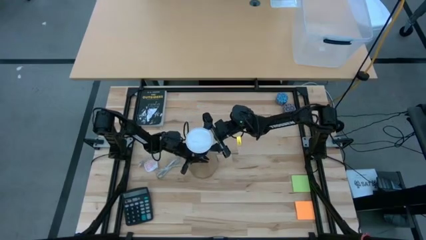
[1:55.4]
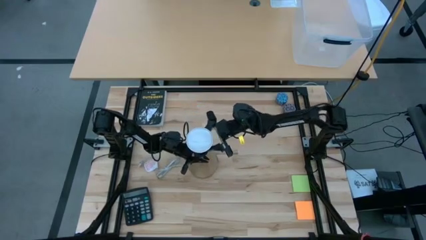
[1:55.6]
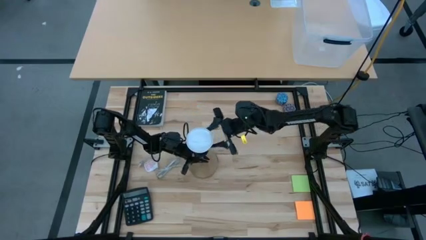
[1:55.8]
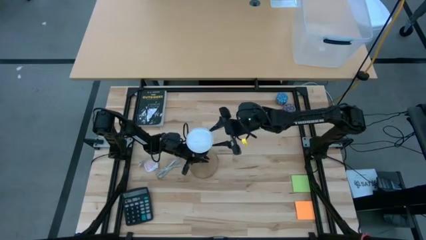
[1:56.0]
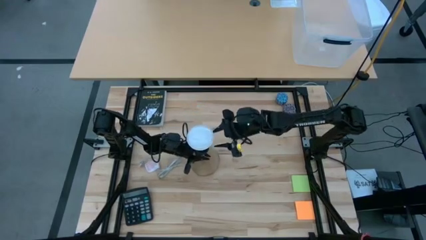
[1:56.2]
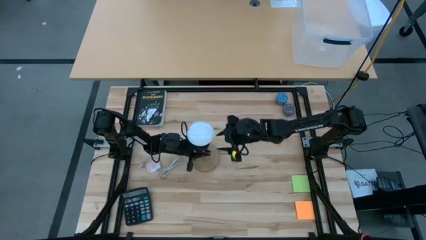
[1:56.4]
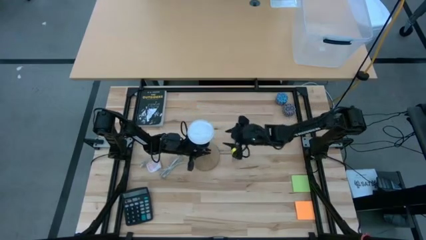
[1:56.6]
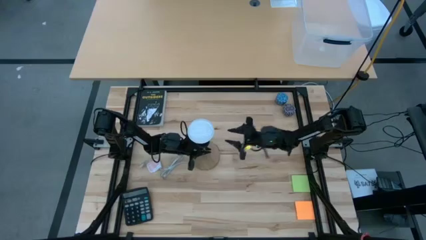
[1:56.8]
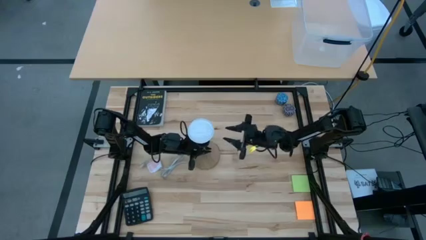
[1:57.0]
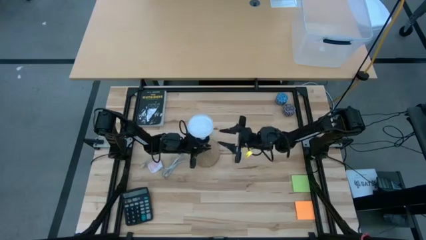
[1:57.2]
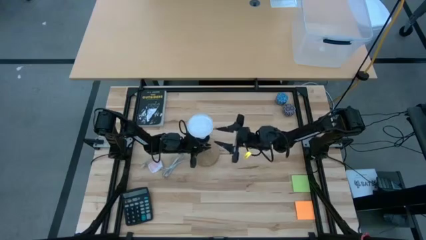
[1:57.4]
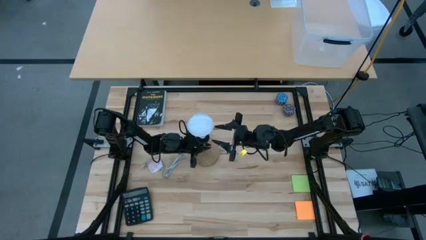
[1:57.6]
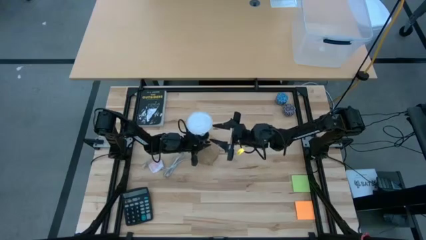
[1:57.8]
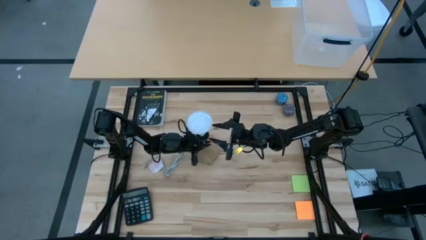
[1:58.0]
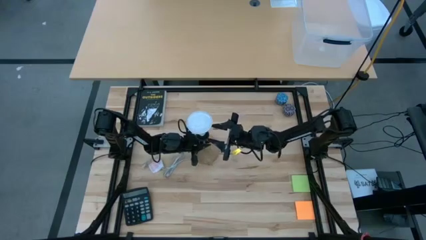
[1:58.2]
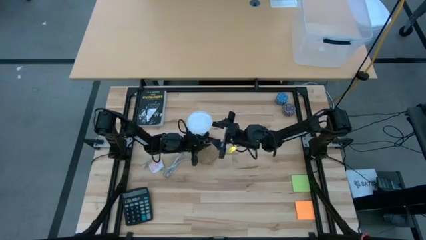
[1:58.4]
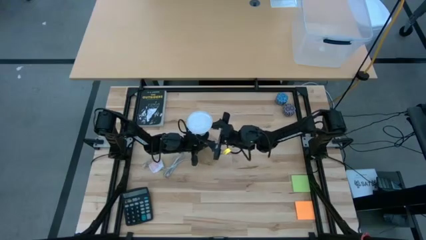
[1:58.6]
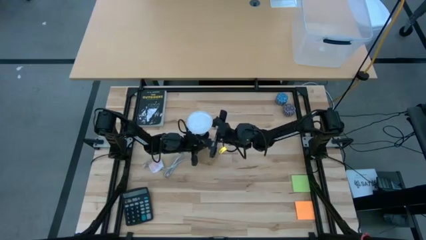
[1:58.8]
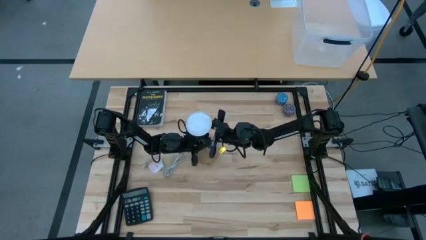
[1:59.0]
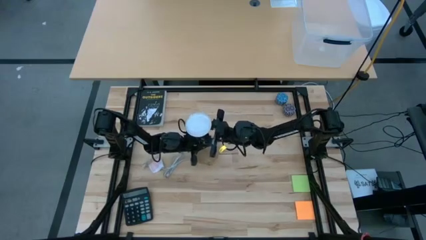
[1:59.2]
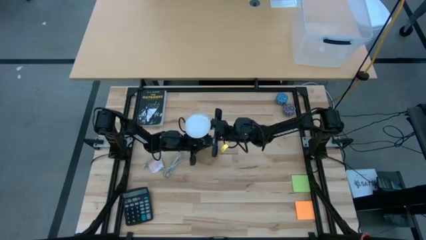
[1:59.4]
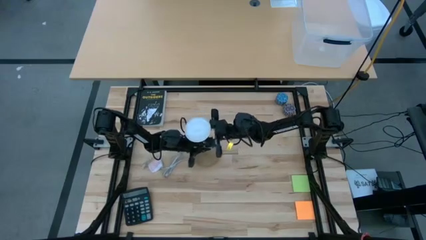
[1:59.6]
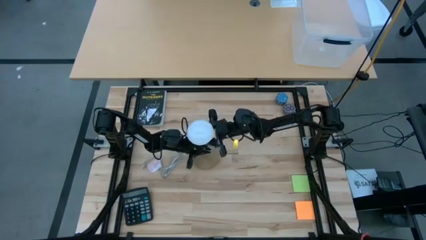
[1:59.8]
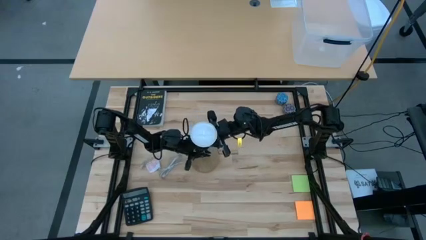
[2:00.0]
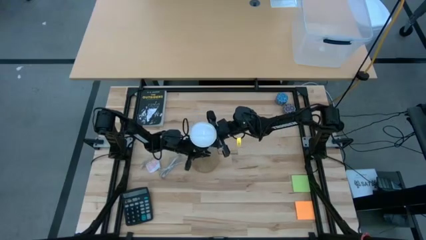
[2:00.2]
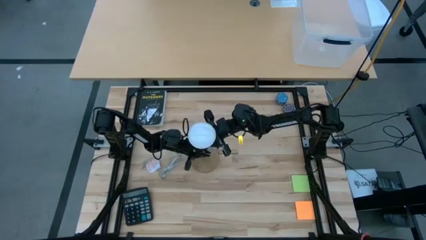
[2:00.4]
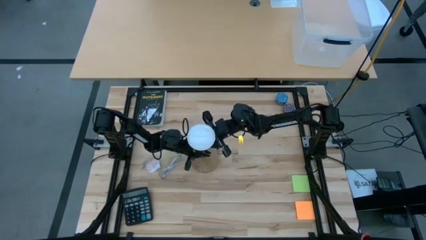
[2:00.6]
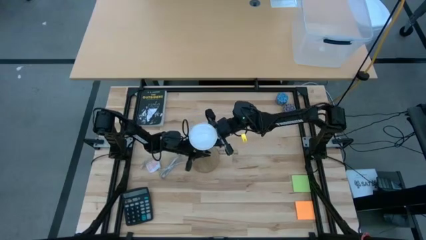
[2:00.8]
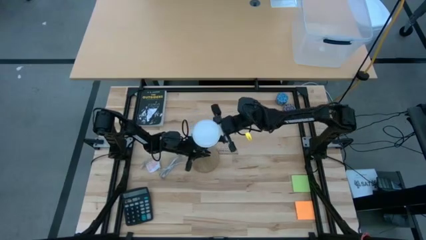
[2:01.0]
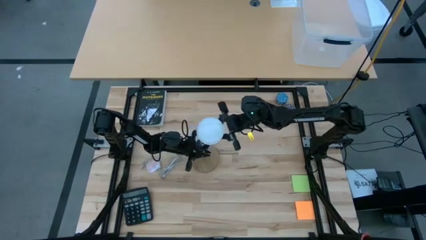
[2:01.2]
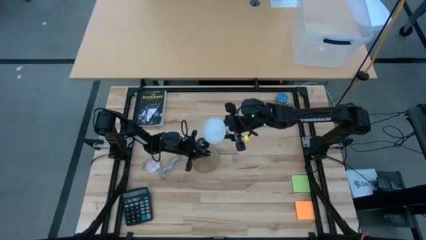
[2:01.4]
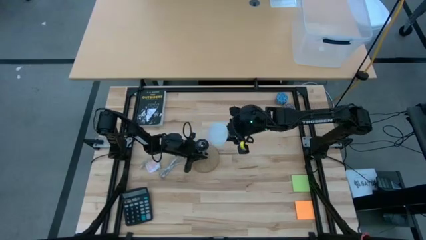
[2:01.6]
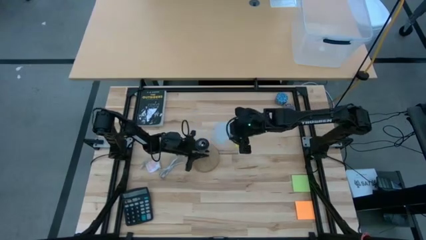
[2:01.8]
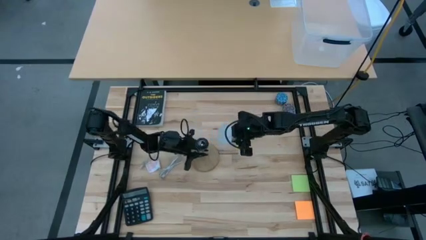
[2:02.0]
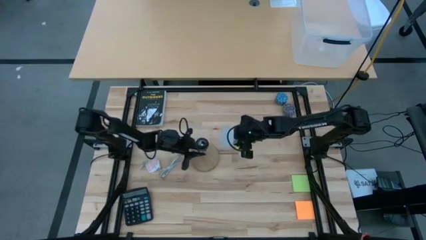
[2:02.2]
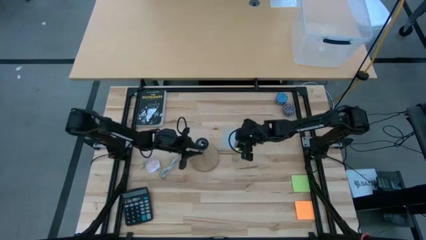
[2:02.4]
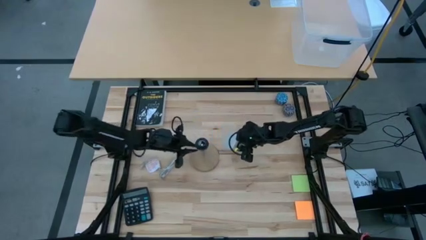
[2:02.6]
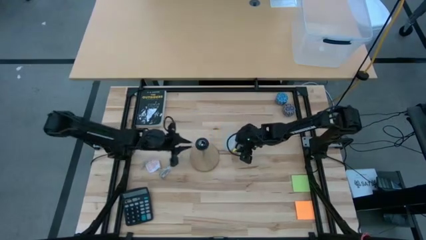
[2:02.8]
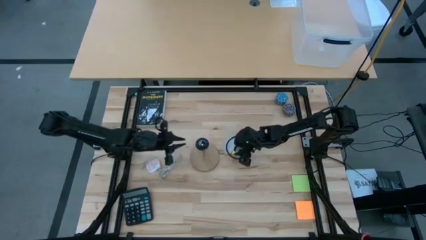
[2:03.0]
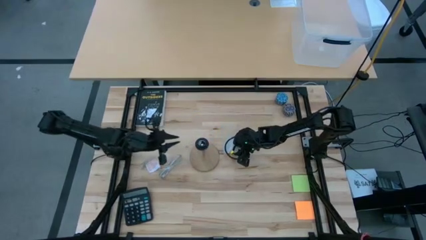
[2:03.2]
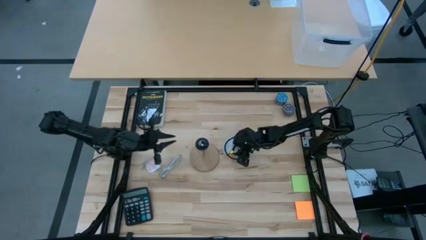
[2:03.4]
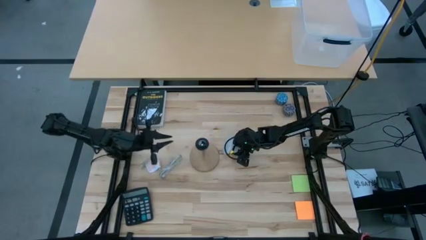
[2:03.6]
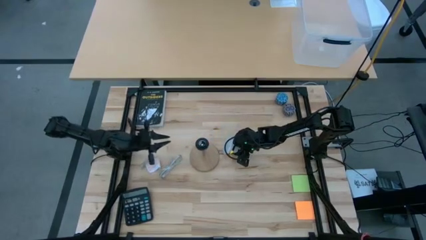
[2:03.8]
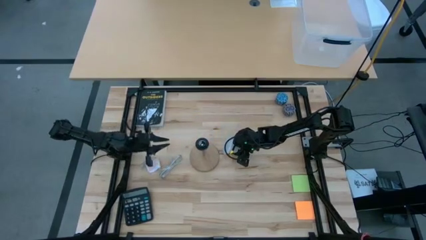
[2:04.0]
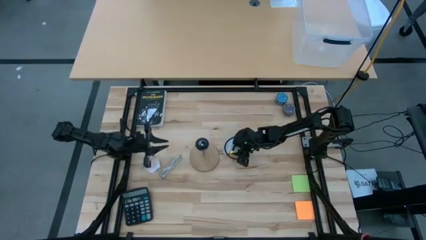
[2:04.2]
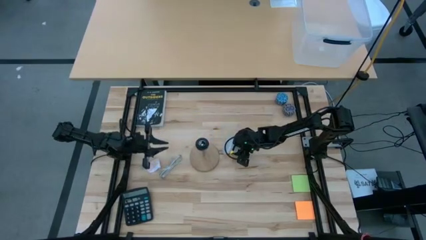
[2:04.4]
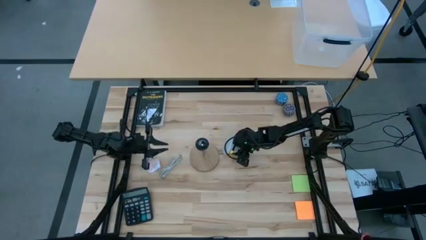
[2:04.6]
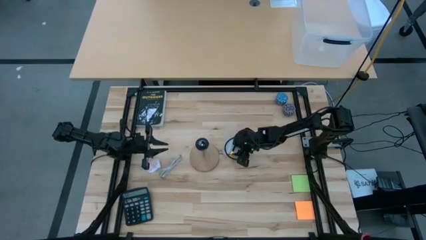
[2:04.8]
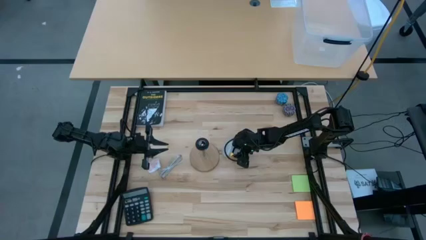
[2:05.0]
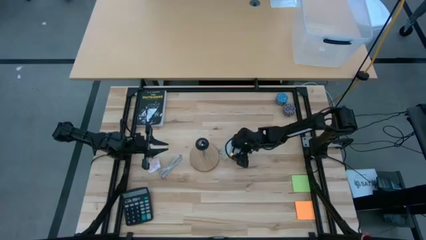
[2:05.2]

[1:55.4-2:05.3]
Task: Screw lightbulb
Remove the lightbulb from the lamp base

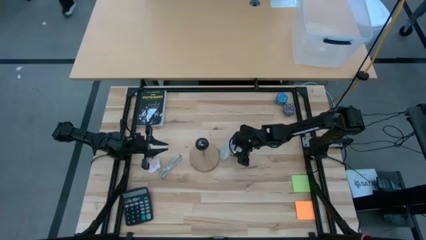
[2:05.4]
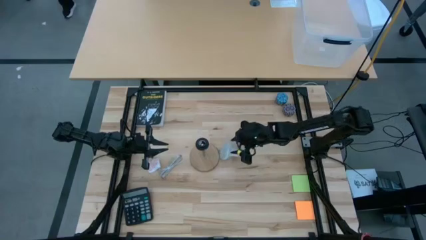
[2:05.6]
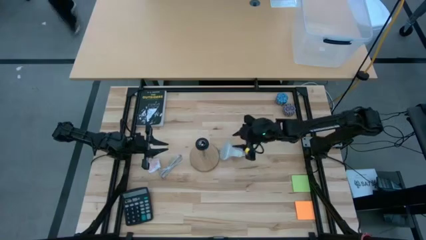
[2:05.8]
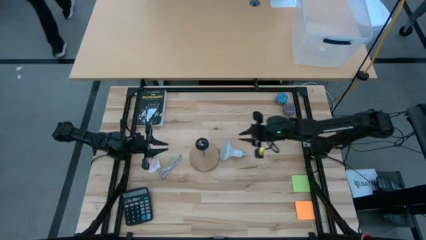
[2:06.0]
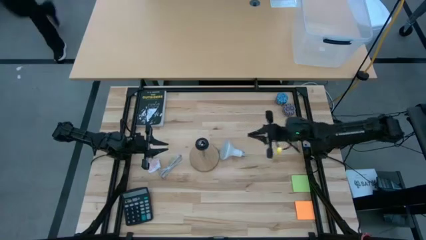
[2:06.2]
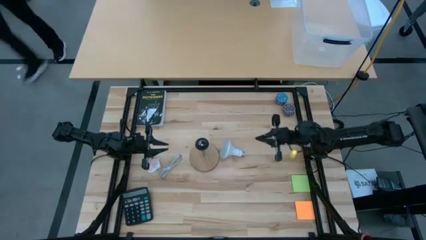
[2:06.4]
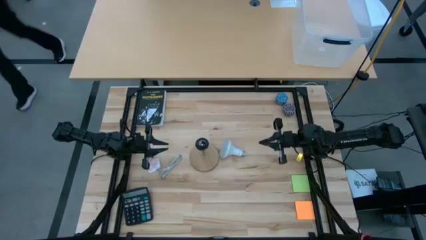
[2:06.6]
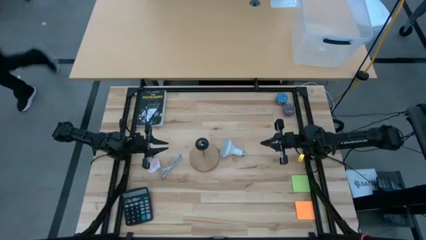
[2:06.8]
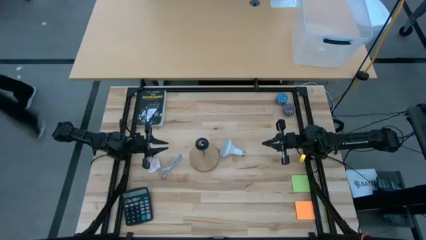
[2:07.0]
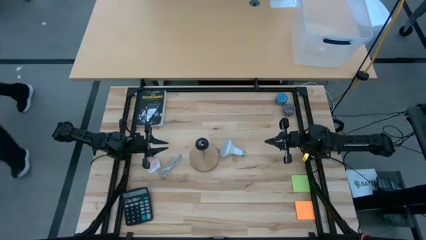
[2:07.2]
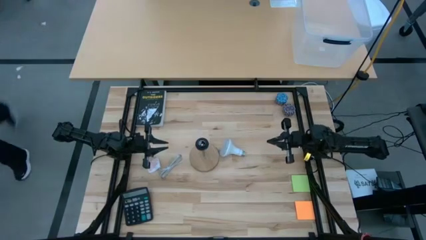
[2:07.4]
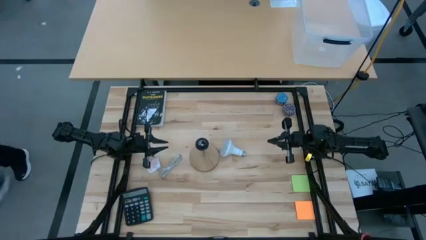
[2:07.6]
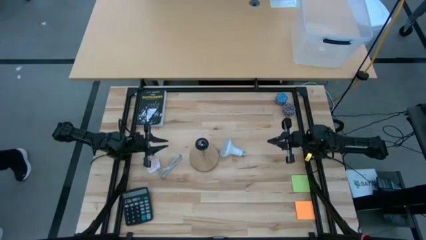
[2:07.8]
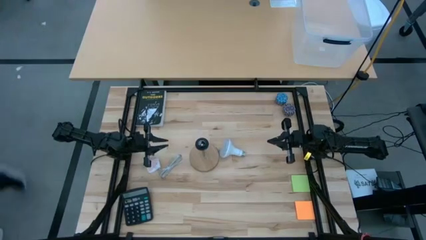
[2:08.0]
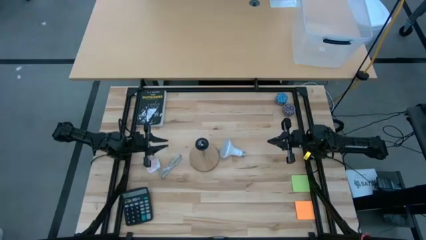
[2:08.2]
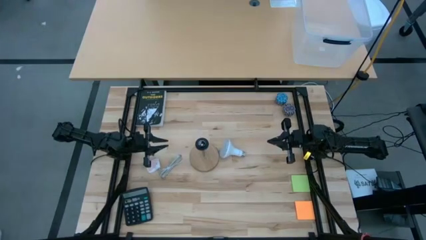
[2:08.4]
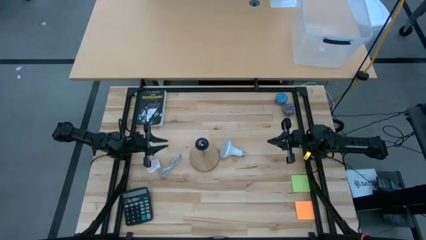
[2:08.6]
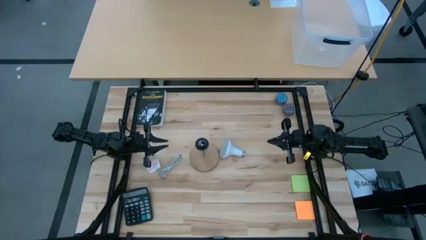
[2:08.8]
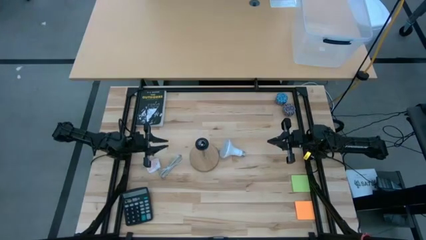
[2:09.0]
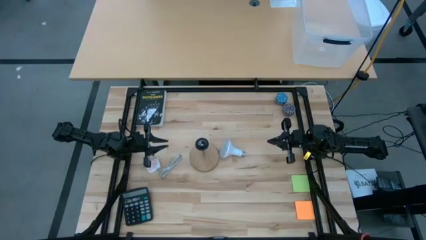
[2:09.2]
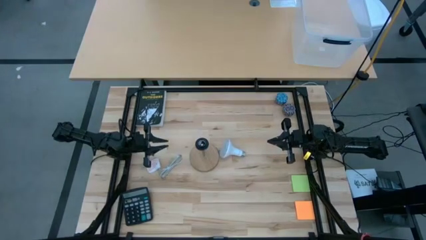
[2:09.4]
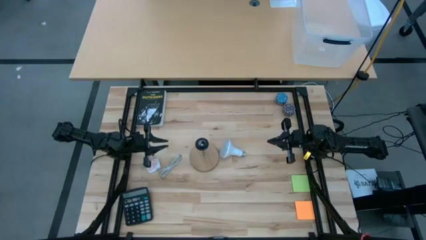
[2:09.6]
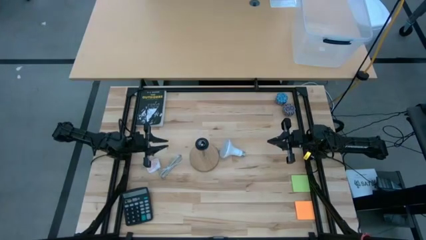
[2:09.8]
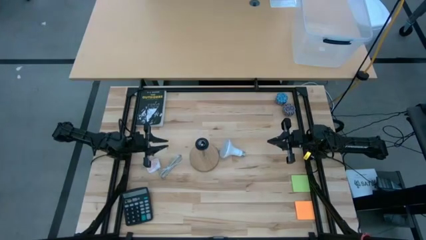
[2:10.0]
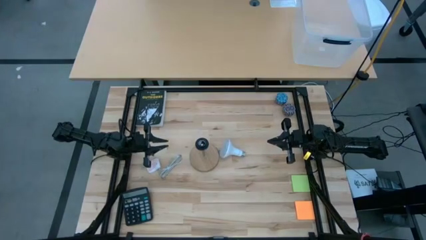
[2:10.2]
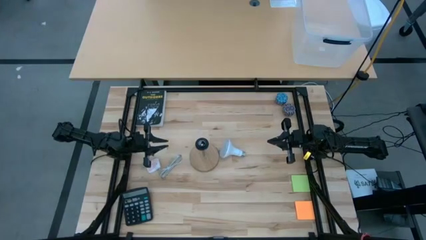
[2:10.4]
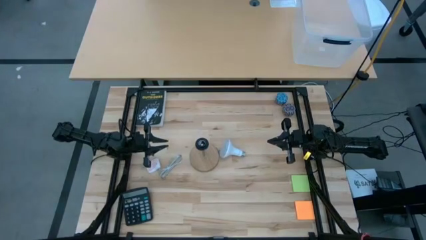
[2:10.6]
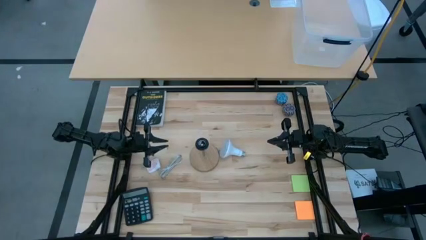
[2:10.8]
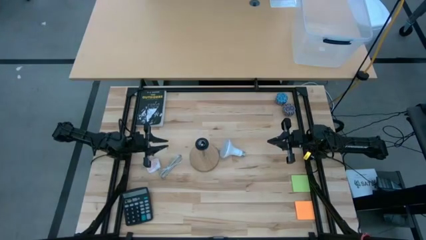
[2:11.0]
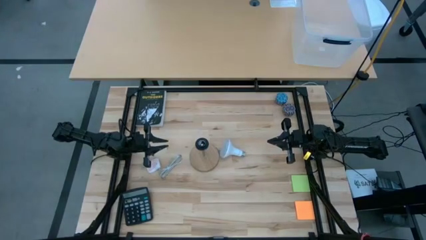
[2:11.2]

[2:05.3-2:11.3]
Return to Home Position
